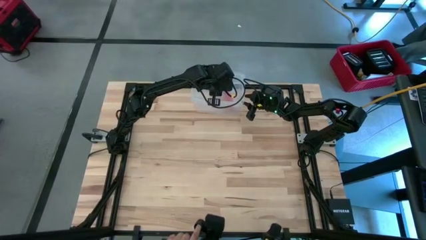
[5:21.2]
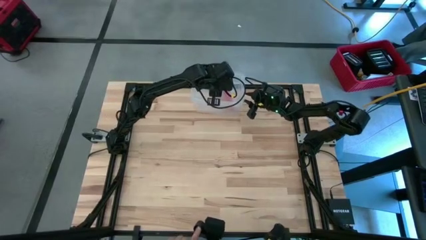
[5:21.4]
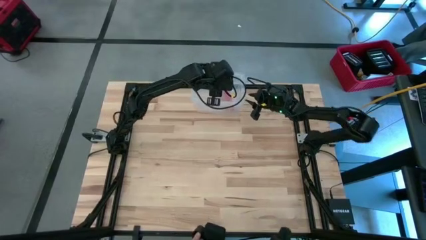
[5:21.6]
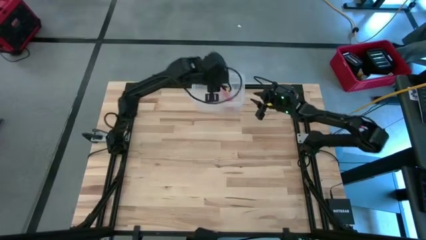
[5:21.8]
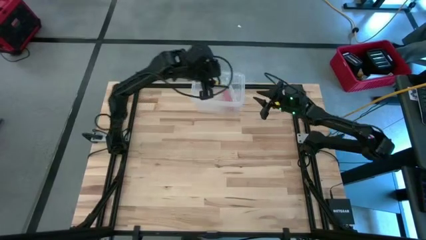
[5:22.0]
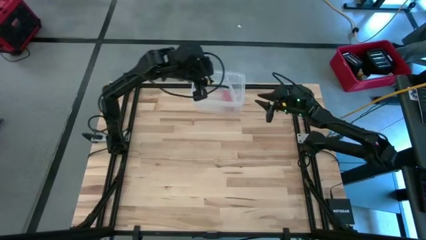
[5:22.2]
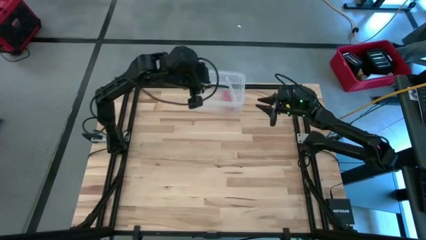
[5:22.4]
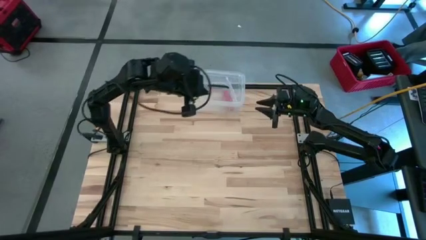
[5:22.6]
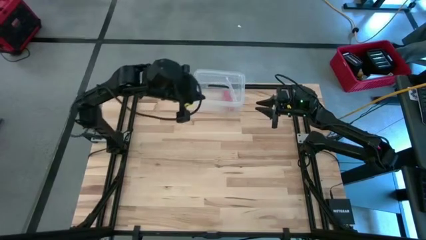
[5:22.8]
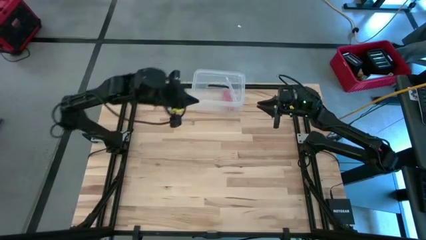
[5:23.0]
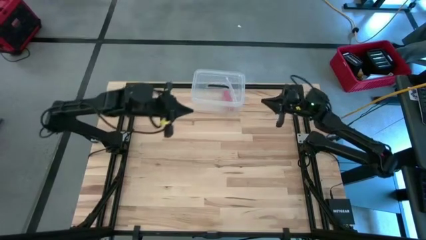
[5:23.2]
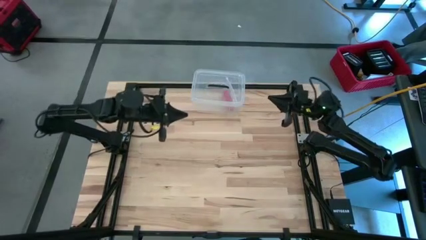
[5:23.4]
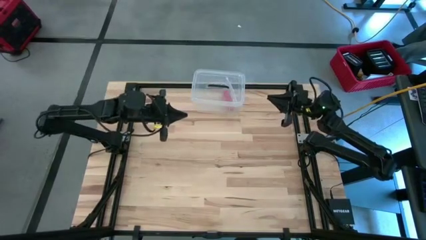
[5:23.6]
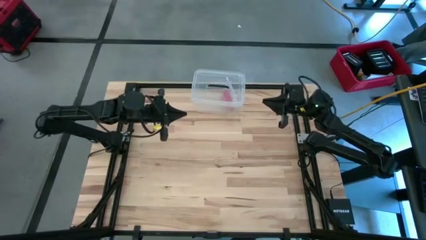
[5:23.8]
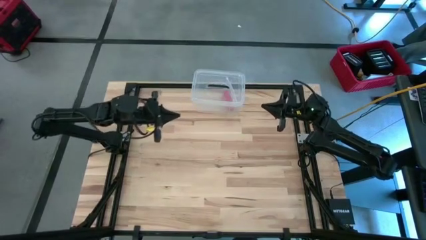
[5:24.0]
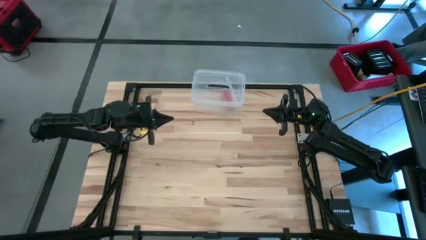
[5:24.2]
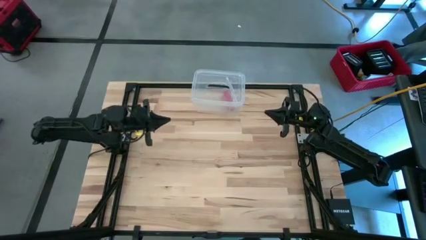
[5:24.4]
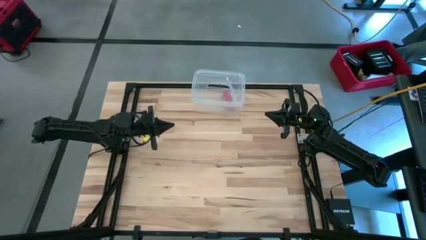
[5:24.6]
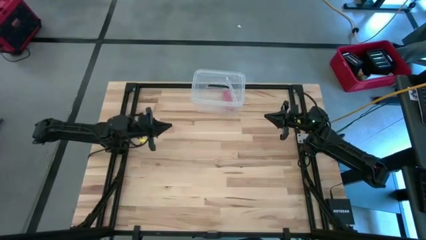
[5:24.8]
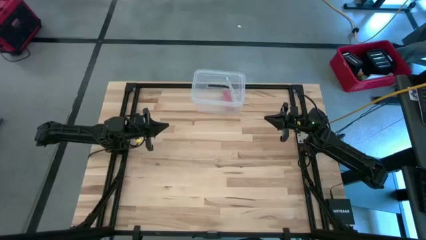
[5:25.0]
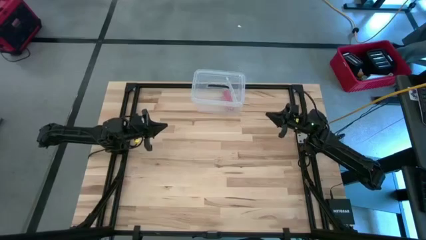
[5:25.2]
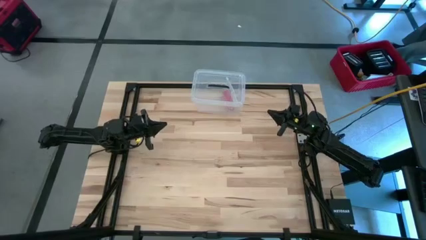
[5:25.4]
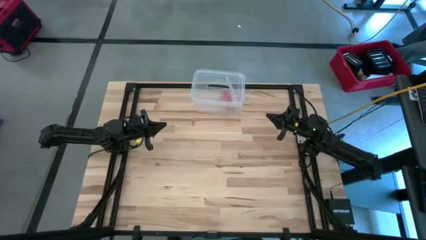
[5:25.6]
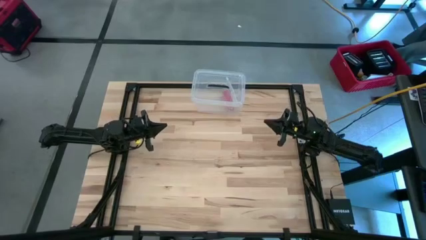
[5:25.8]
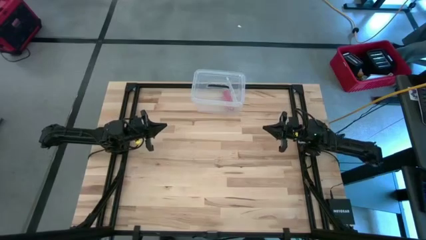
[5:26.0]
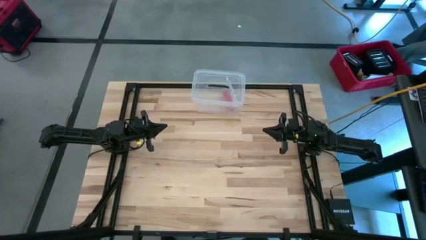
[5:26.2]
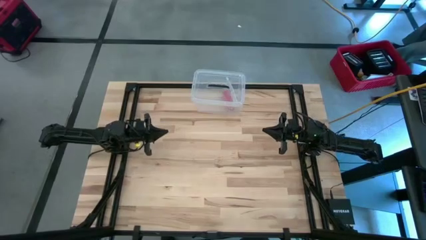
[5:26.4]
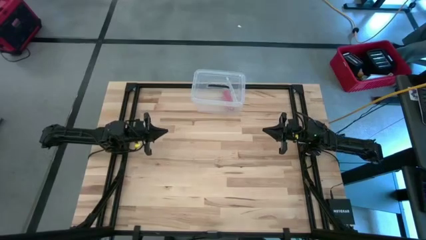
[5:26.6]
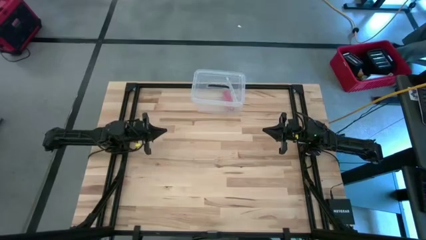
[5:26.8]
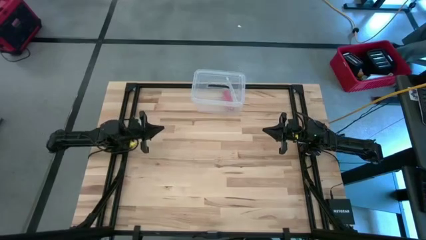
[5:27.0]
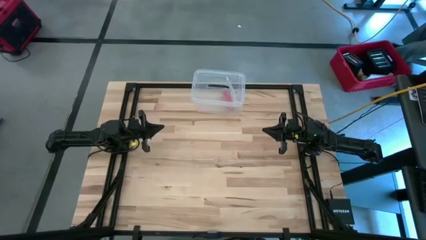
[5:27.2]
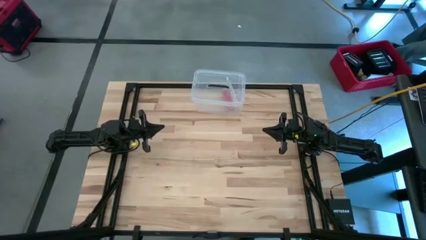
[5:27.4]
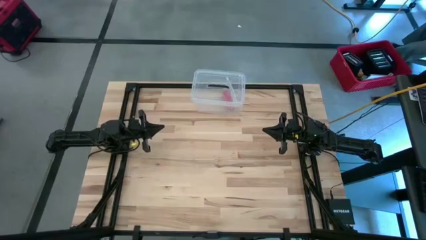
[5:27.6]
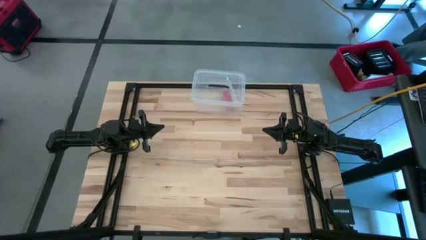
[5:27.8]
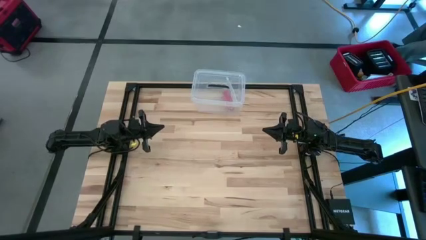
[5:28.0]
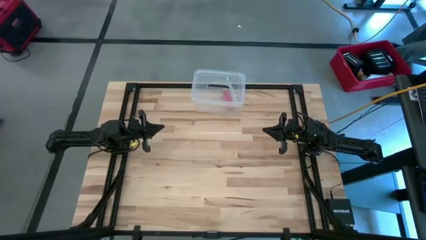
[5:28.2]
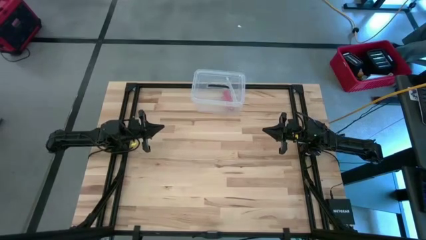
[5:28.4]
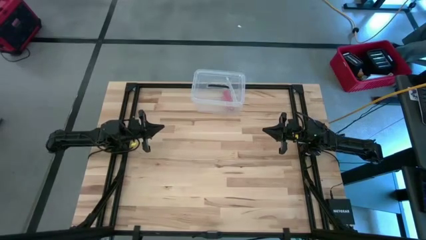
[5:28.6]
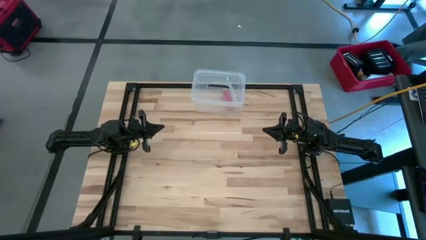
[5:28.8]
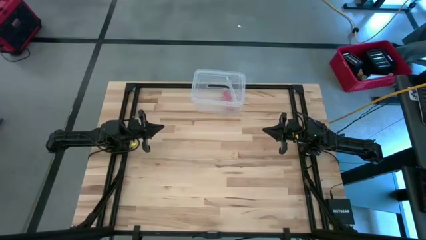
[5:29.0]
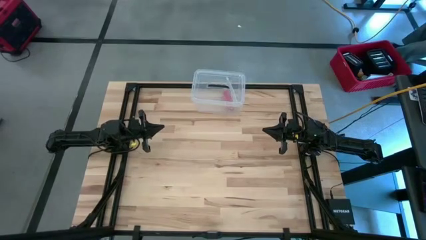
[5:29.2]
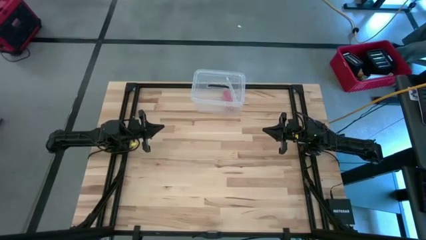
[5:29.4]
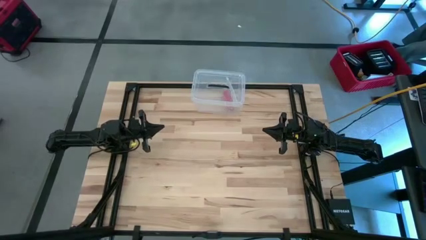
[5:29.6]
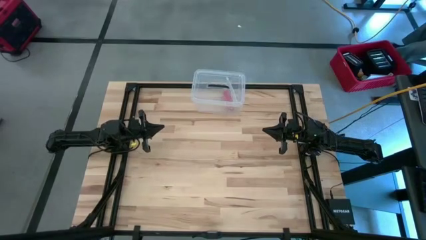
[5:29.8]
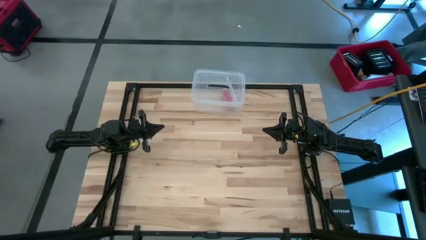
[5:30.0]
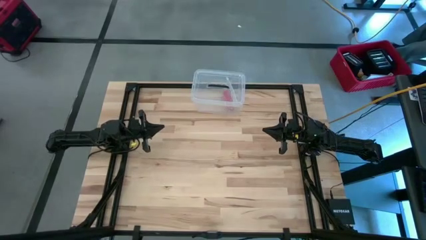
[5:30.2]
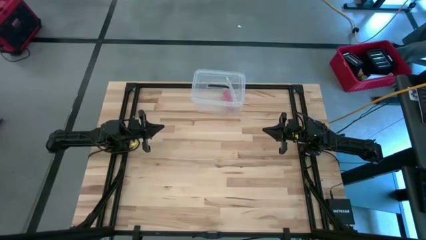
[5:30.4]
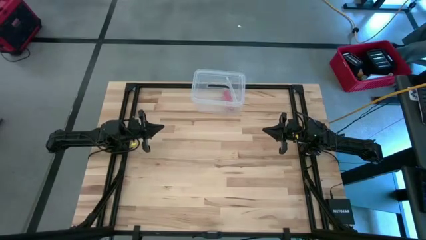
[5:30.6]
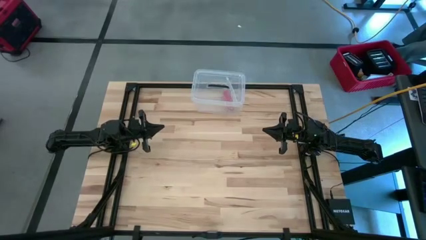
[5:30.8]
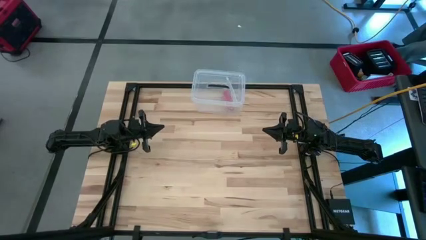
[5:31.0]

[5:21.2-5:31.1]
Task: Roll bandage
Return to Home Position

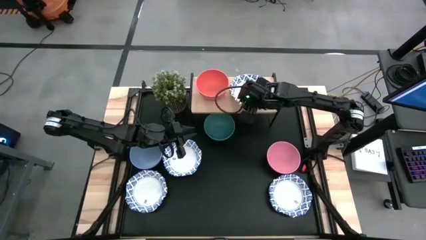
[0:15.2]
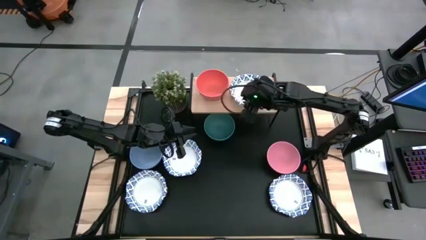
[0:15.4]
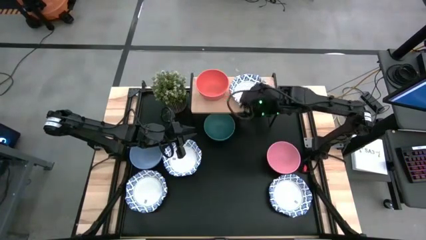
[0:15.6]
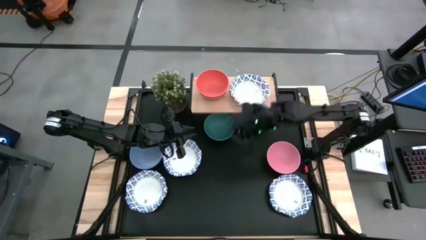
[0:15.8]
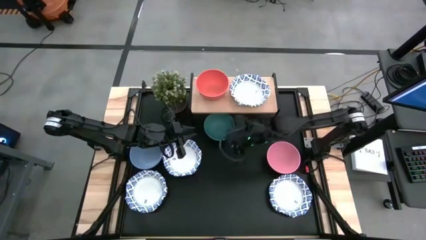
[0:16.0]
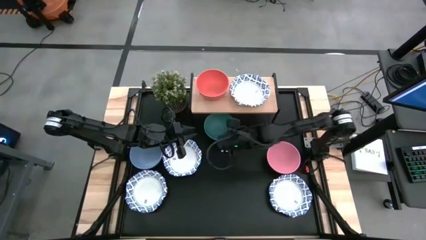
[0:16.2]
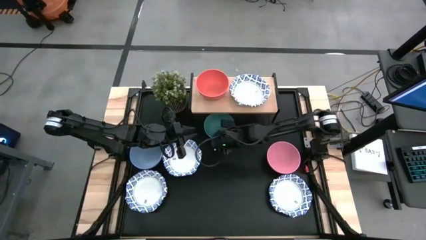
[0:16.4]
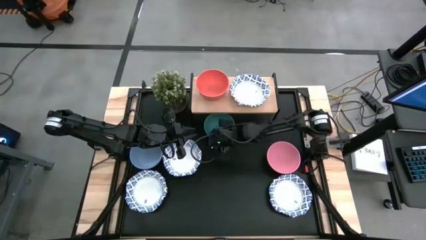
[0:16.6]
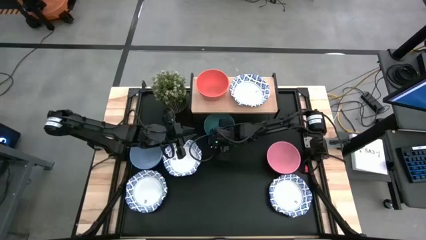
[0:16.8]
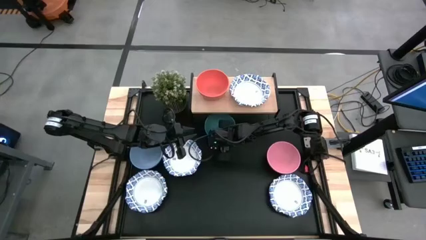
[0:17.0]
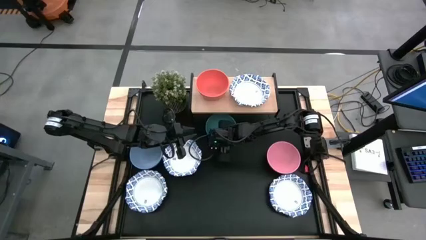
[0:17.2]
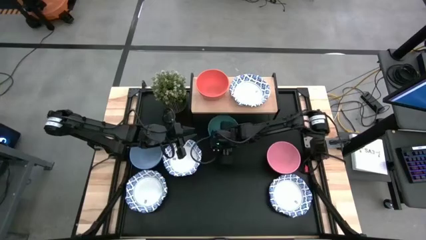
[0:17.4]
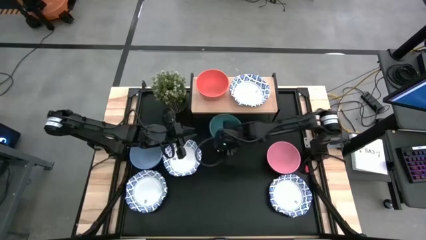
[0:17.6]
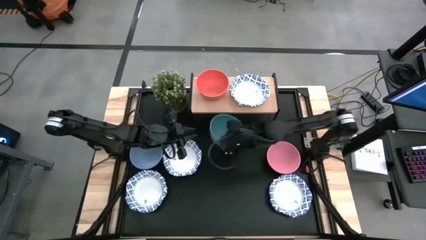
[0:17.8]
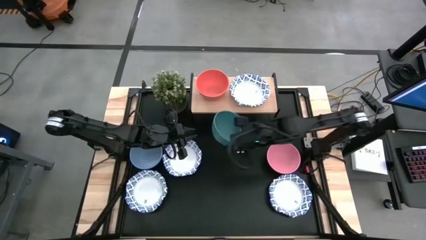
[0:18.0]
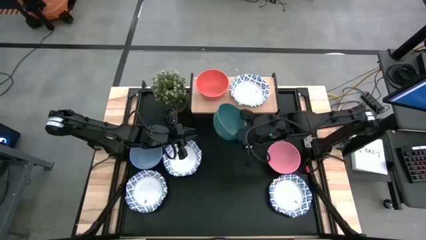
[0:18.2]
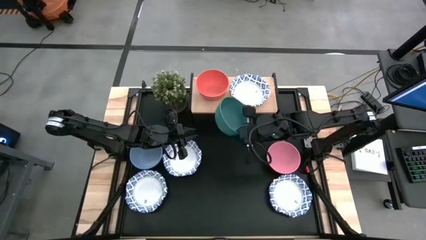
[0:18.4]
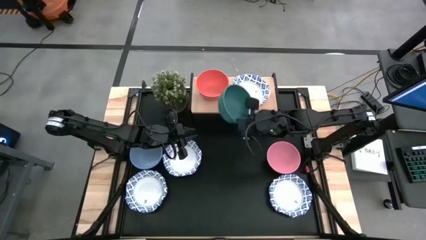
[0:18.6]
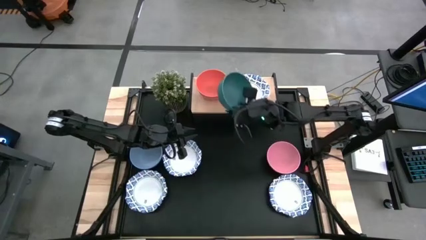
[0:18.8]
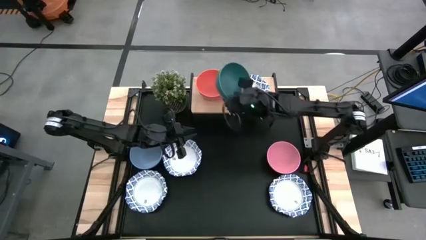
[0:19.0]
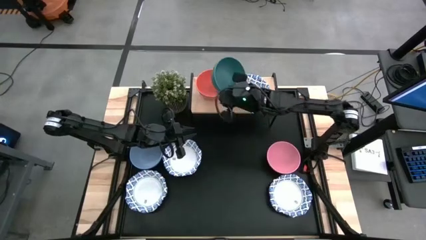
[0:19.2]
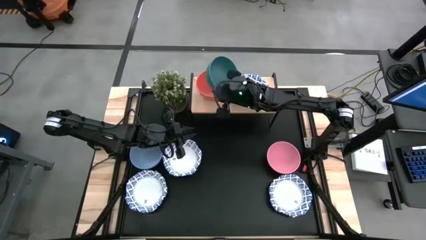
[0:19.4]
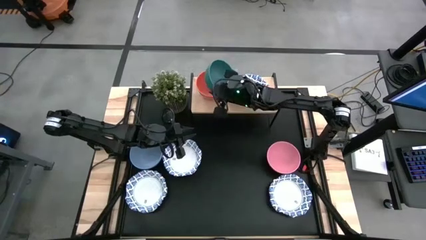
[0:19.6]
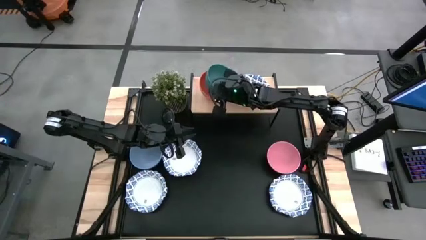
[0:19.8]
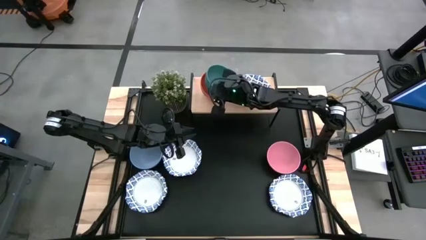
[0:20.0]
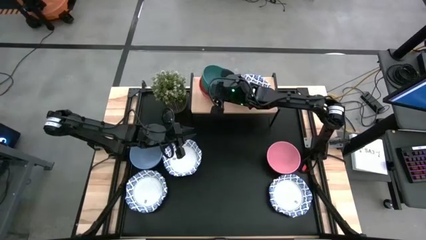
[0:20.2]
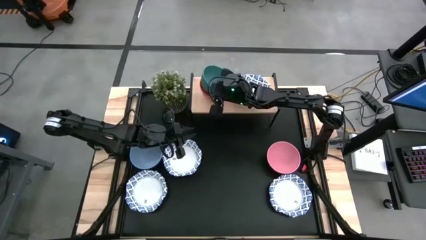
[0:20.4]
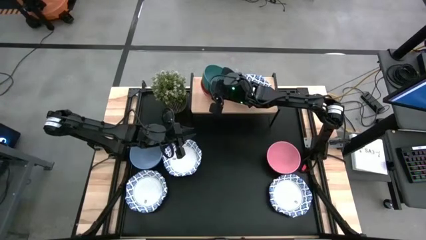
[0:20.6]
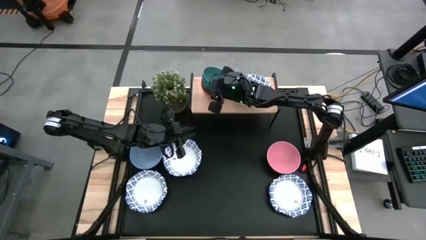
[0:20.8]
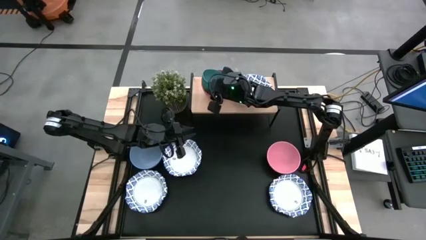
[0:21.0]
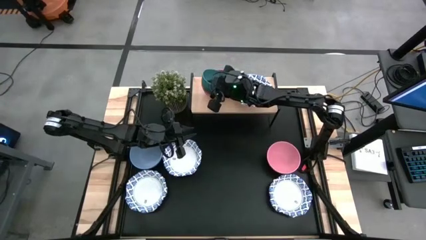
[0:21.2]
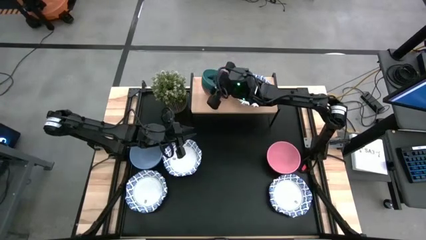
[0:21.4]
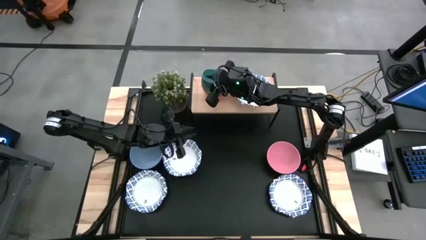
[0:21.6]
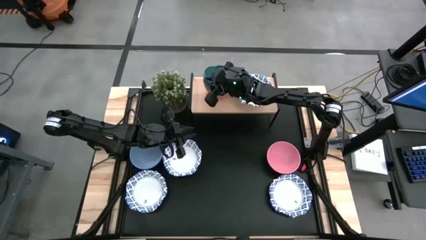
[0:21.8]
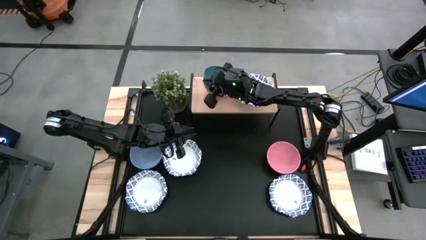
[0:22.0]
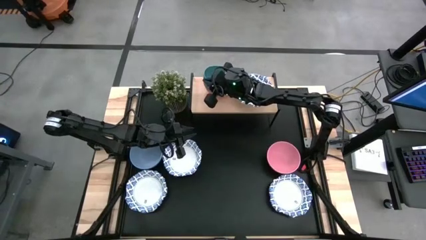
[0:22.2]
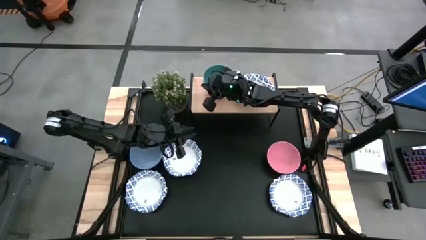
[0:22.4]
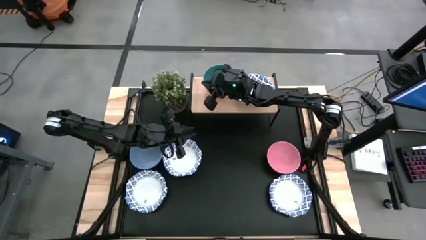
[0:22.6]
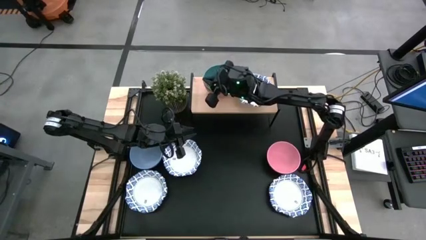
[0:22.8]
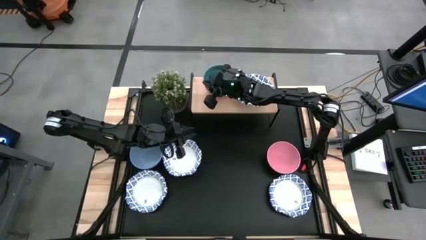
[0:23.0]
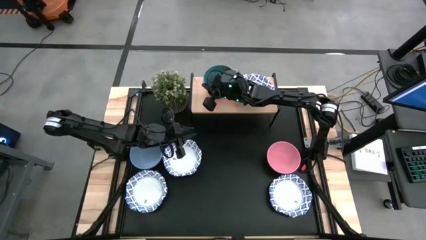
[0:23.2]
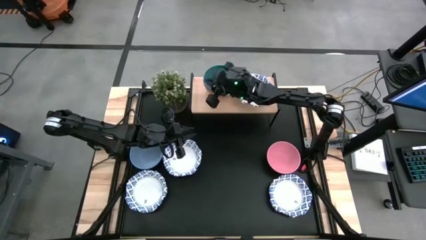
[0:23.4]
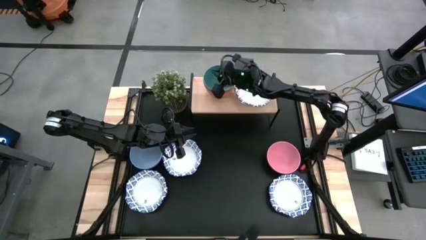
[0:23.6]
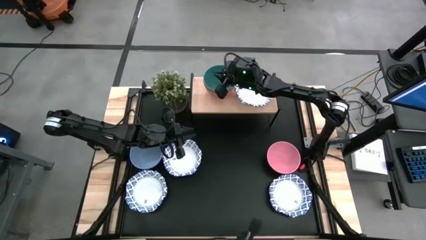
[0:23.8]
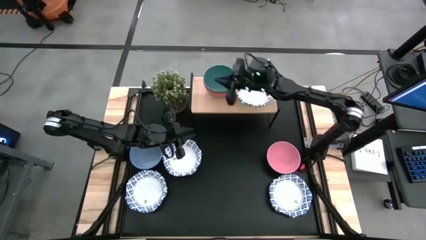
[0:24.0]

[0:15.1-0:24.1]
Task: Place and stack bowls onto a shelf
Stack the green bowl on top of the orange bowl on the shelf
